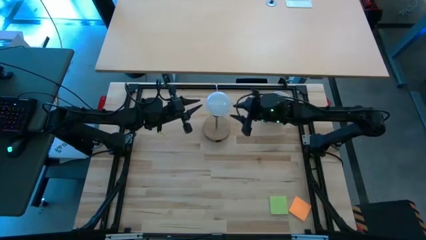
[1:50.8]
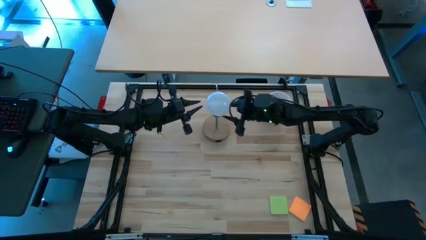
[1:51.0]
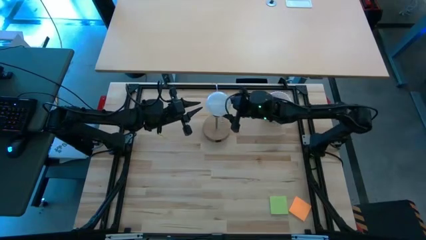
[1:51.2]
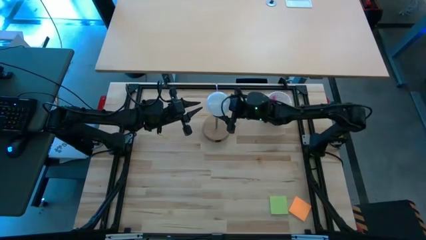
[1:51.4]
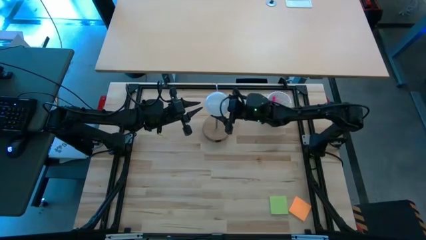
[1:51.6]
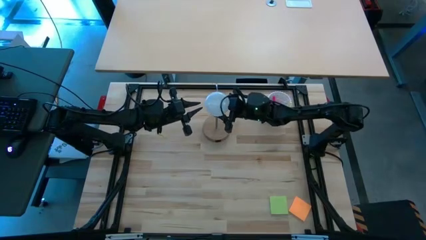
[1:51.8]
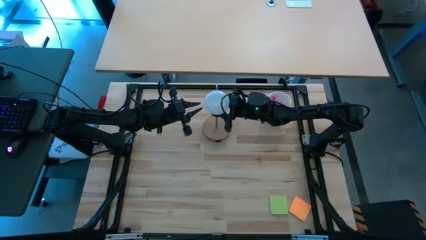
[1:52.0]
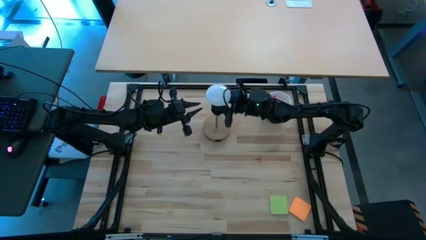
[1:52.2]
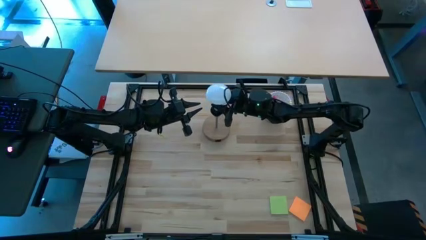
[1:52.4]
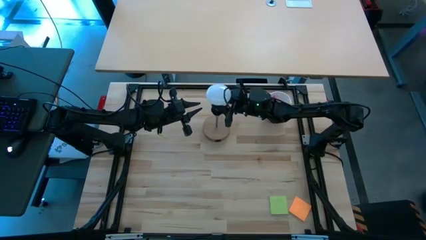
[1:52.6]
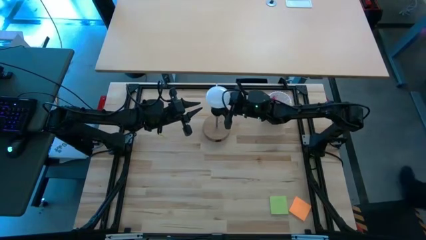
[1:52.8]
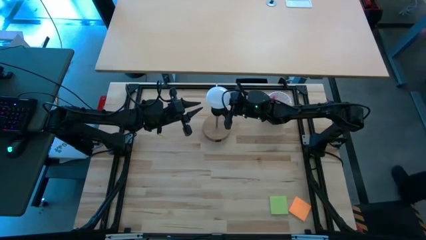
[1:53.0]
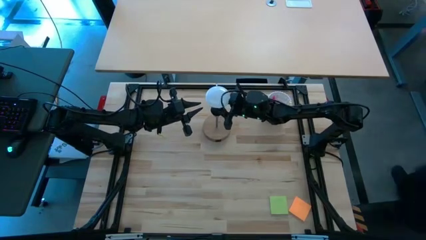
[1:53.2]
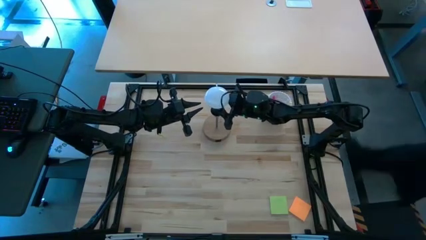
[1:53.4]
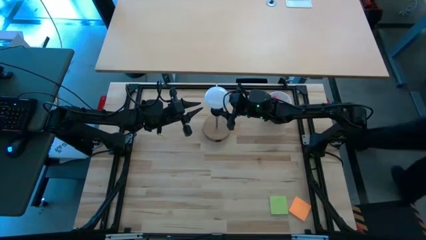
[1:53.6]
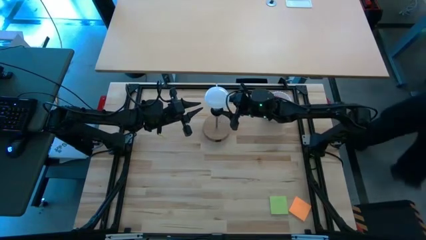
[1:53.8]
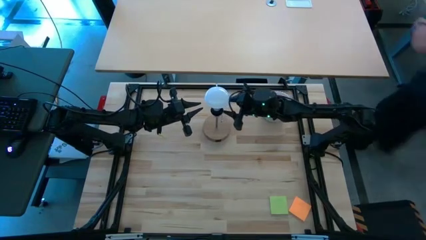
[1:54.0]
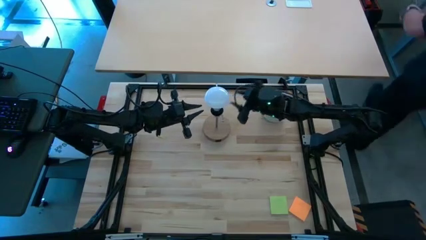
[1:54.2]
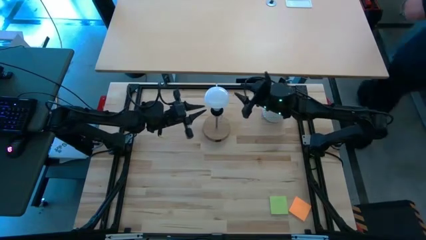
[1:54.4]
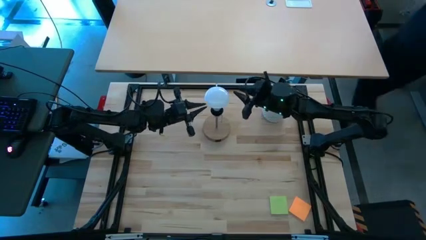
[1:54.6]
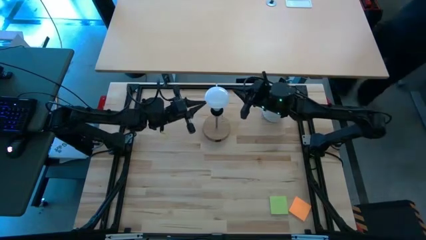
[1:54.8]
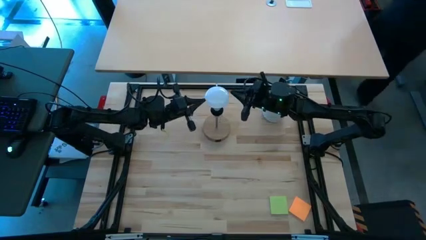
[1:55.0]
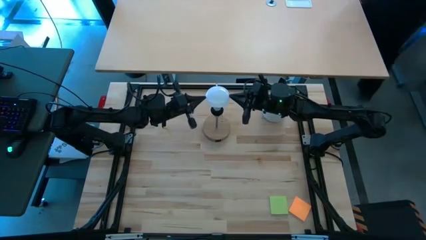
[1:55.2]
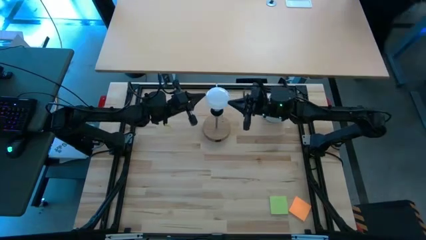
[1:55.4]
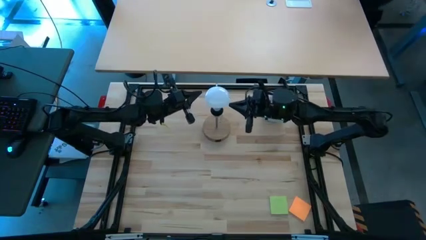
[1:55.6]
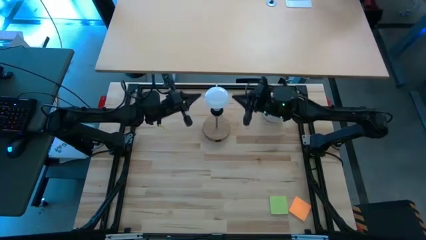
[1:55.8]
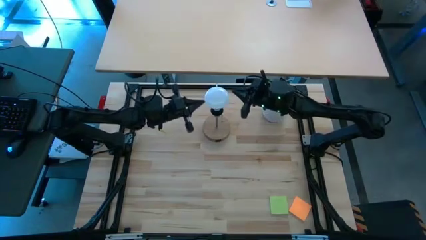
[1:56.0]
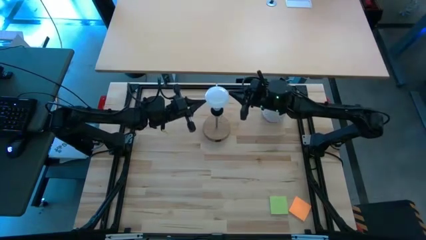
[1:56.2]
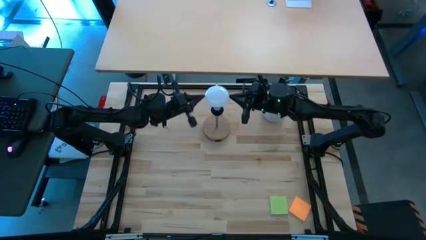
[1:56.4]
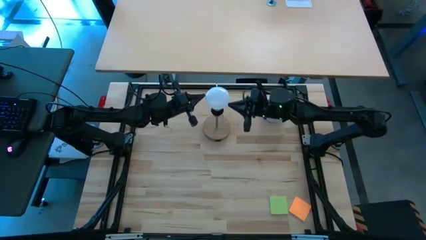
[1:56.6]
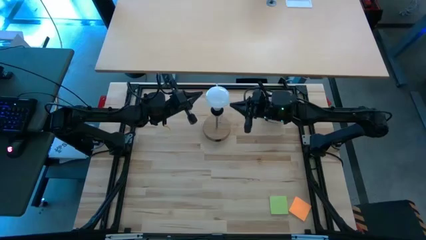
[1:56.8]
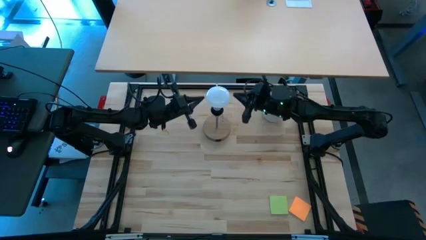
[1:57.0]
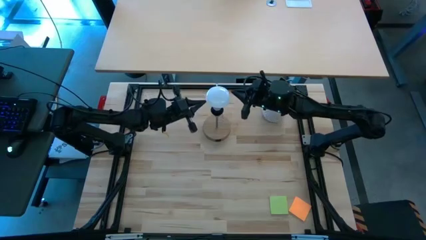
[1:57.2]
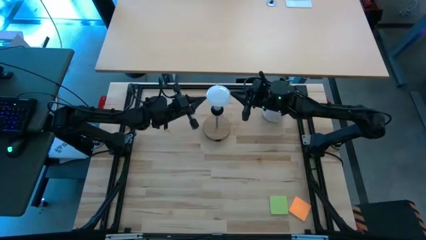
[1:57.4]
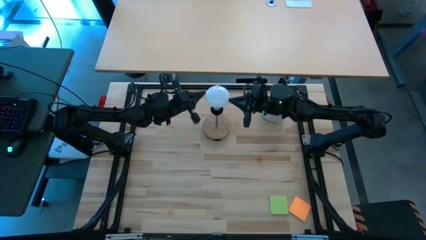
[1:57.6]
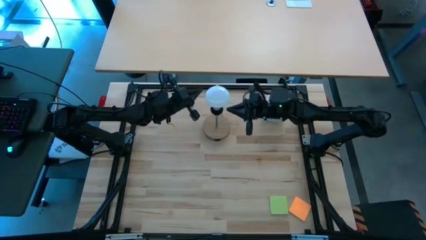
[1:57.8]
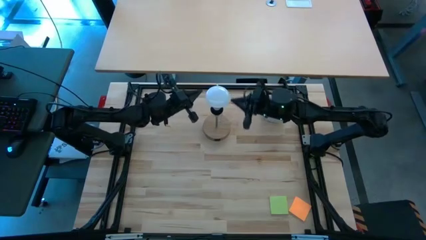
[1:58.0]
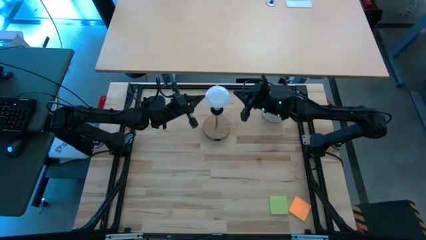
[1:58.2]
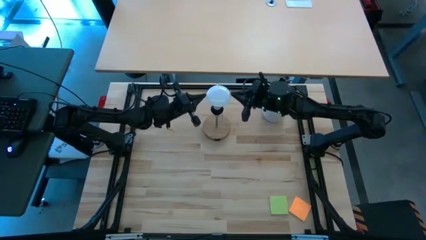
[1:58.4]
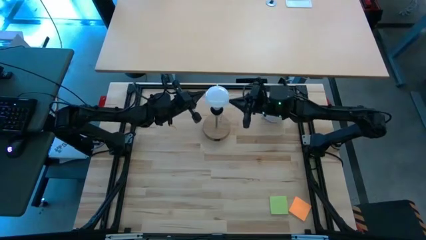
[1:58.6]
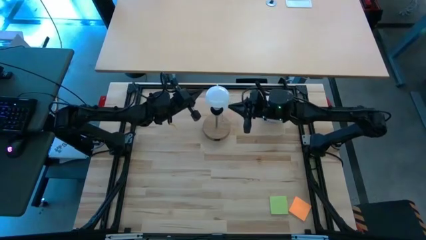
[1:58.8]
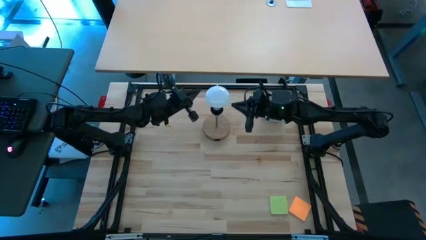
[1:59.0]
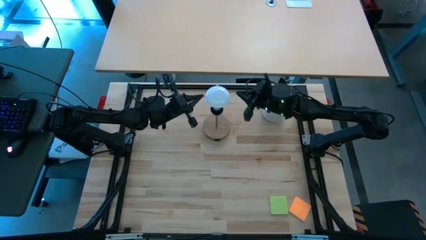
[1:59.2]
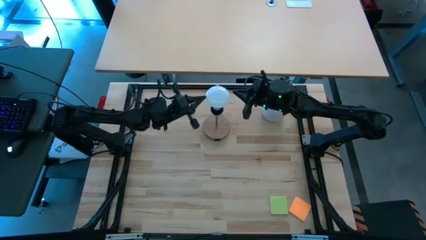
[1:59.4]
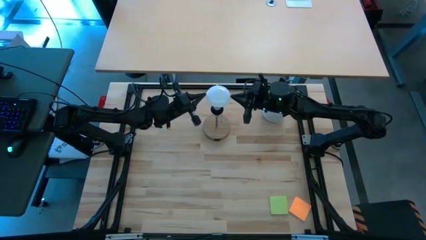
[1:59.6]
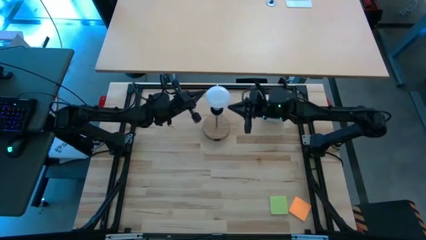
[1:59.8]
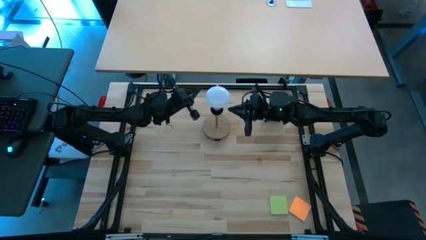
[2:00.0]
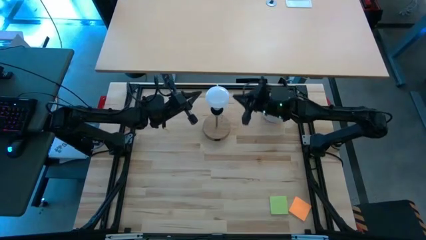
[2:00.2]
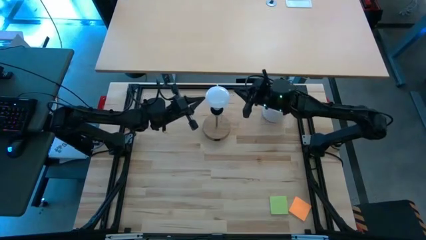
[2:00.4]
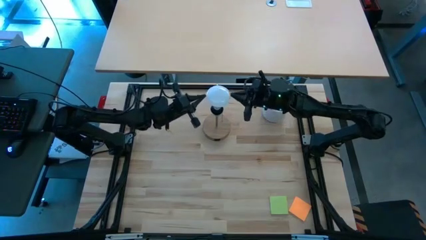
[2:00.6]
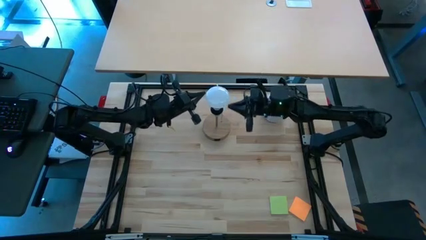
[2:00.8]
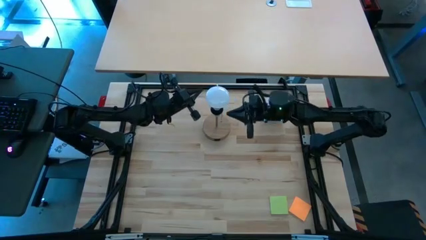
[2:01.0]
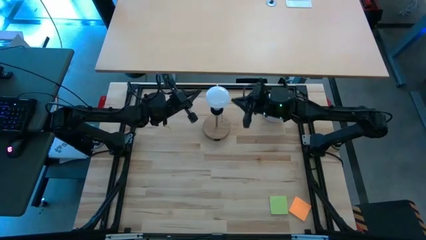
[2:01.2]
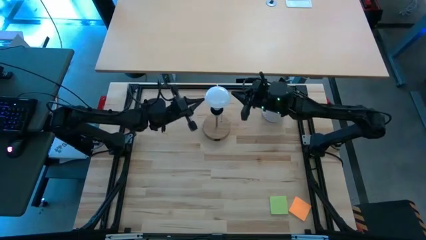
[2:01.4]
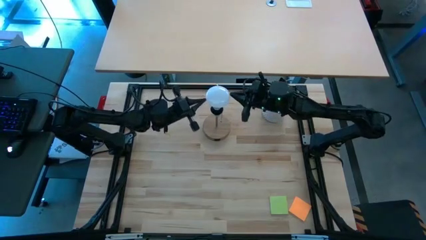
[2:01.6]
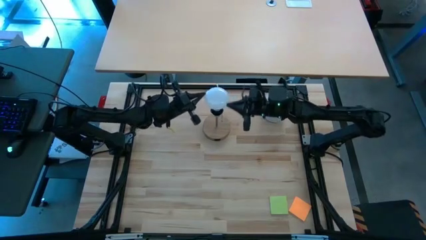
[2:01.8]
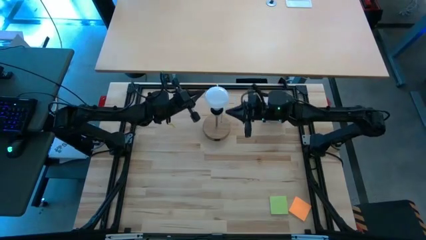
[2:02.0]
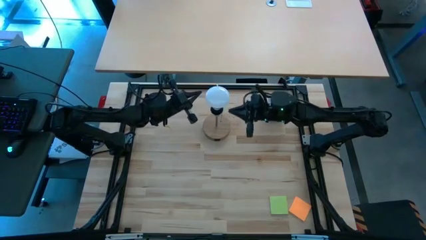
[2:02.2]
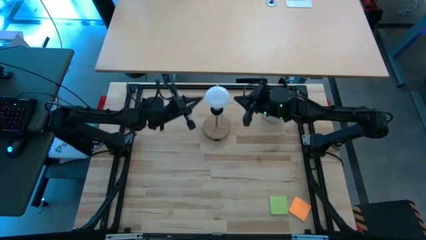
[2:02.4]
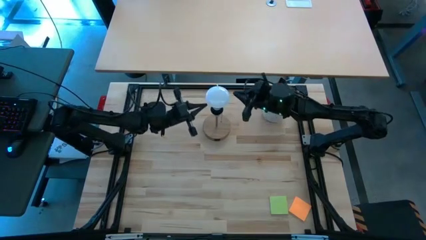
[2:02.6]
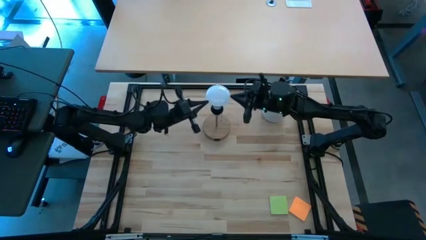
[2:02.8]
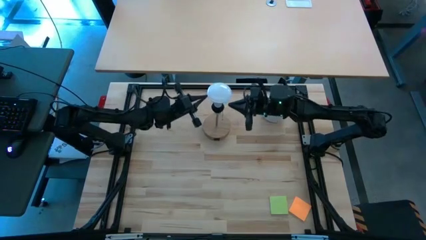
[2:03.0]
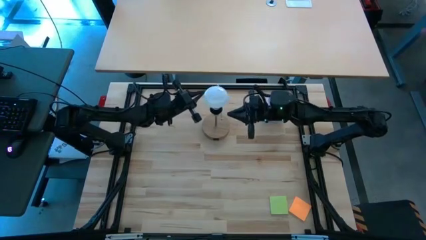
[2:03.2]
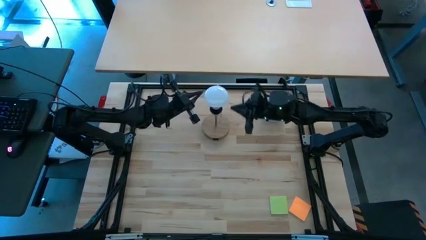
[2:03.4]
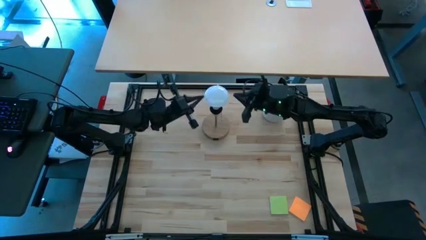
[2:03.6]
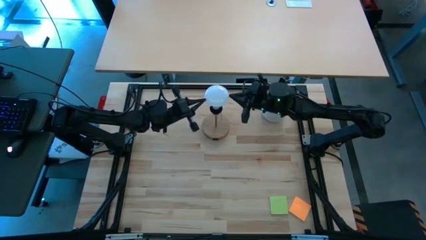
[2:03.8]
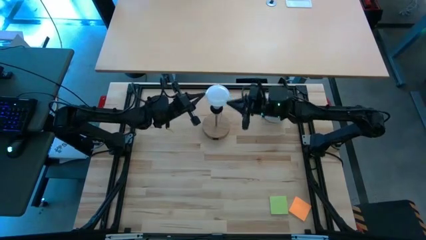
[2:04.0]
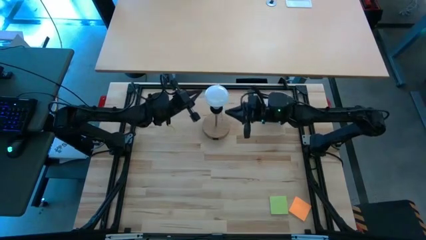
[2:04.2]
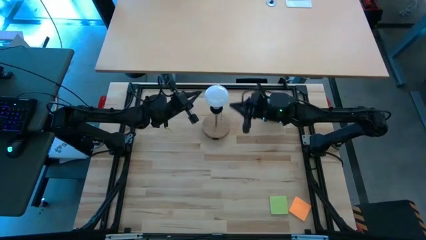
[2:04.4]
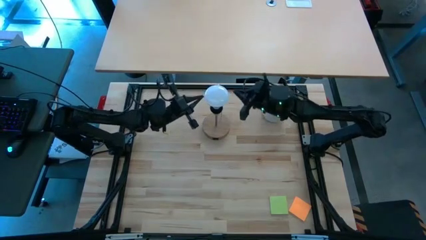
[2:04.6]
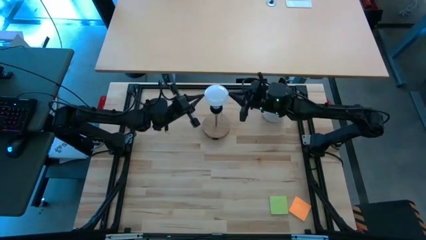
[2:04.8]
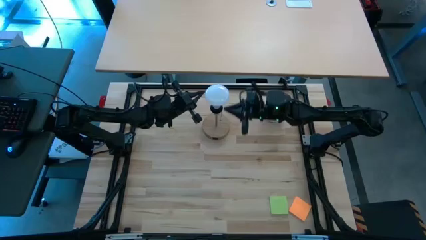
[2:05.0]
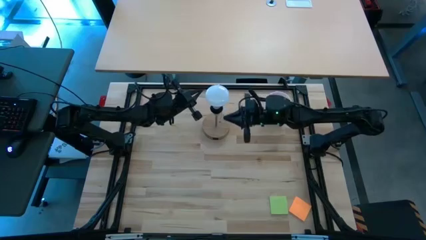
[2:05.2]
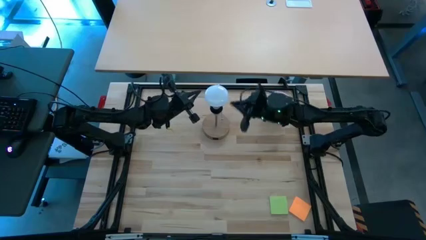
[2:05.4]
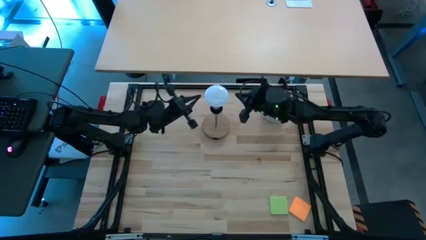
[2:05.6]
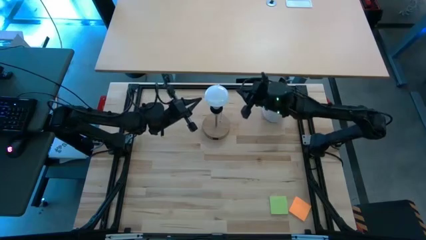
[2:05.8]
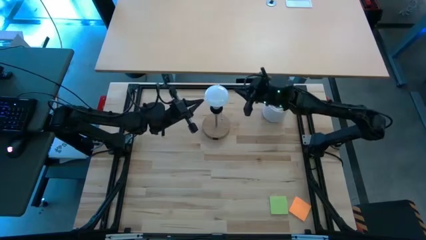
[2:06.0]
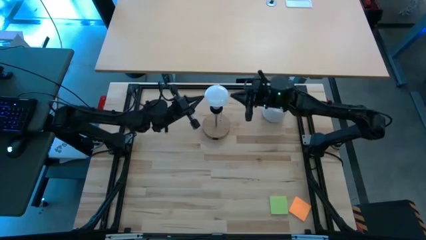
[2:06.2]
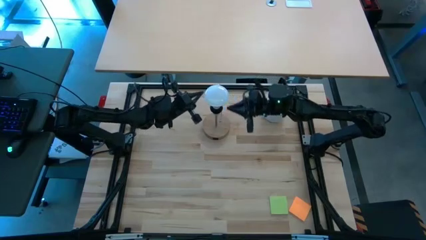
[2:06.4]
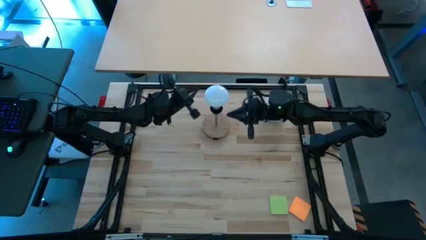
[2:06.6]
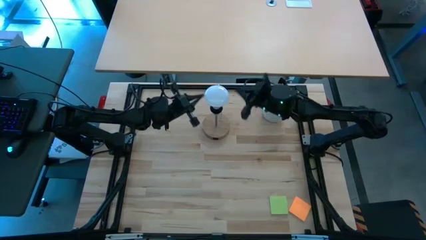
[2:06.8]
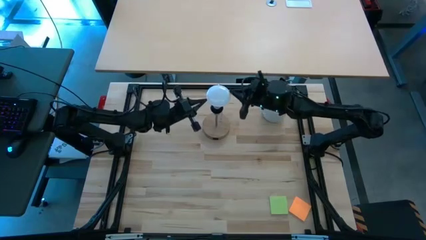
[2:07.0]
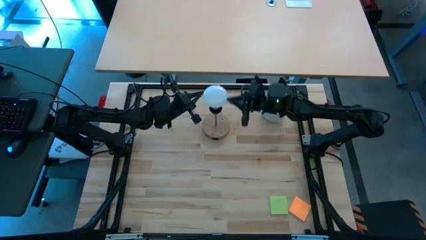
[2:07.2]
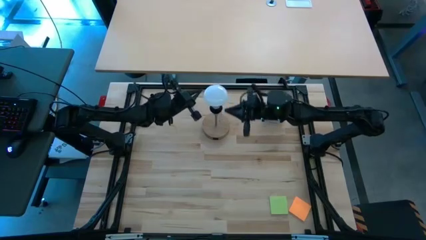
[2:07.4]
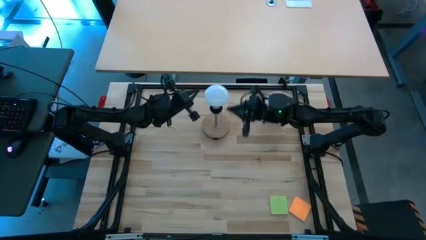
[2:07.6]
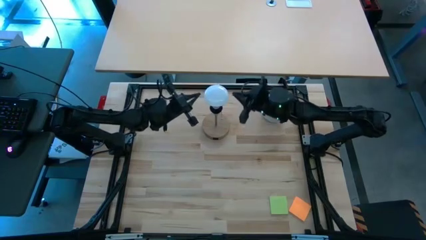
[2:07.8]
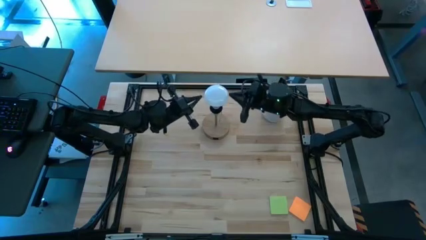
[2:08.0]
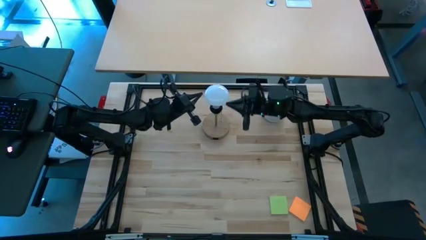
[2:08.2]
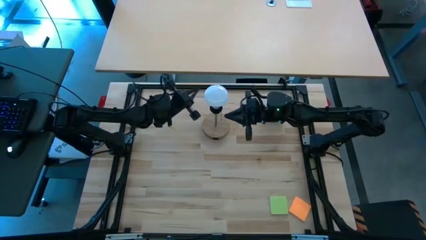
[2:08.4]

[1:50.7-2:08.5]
Task: Screw lightbulb
Insert the white lightbulb into the desk lamp
